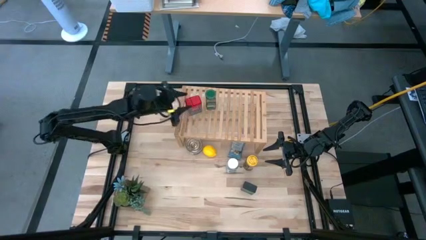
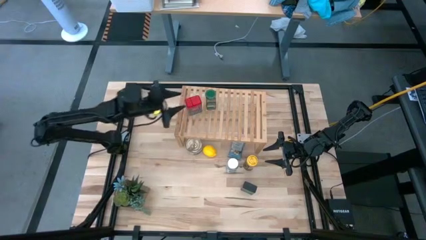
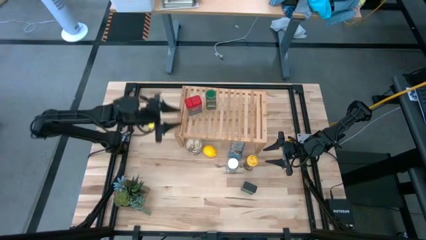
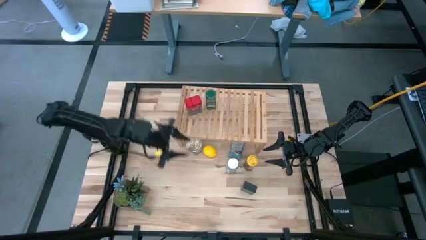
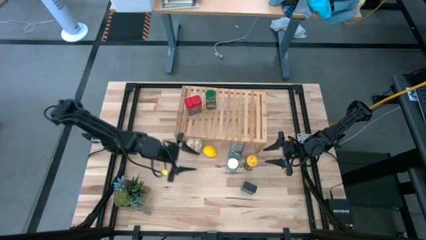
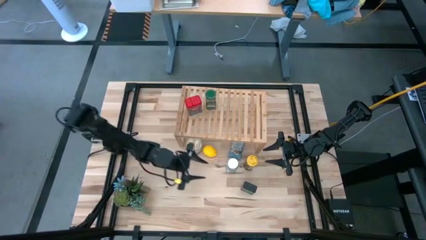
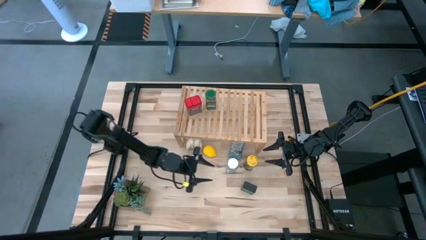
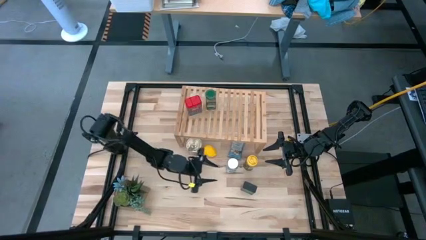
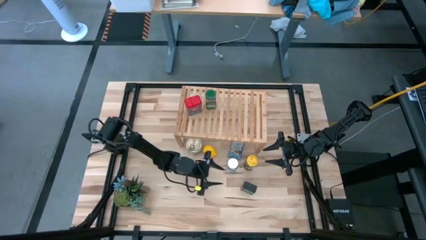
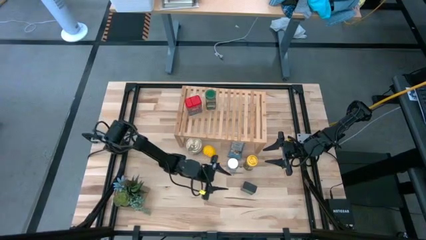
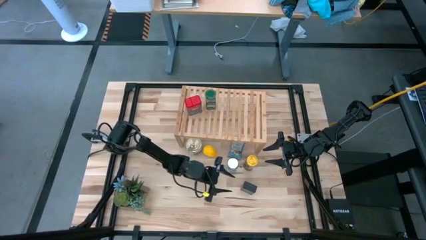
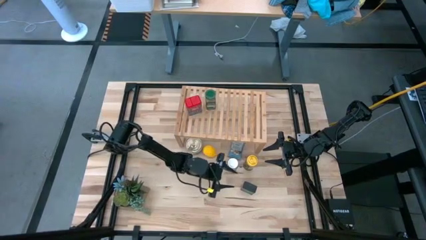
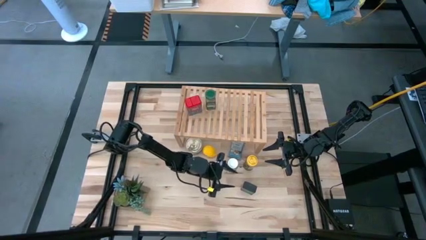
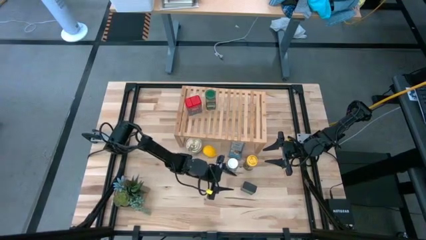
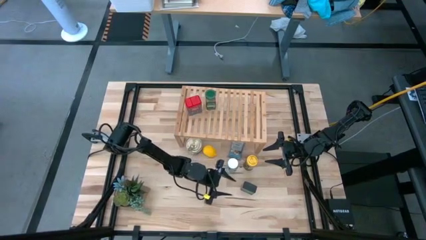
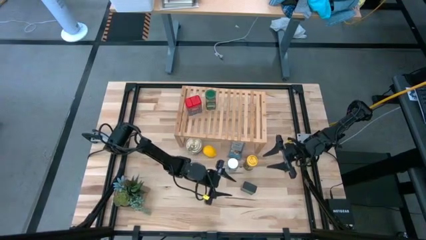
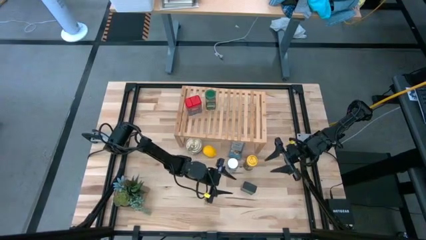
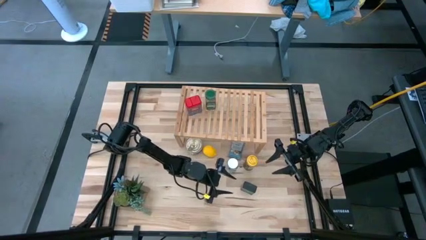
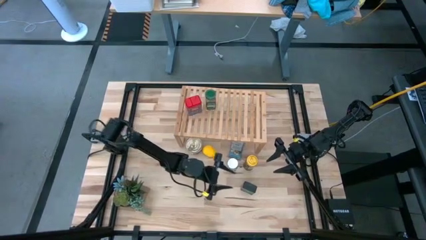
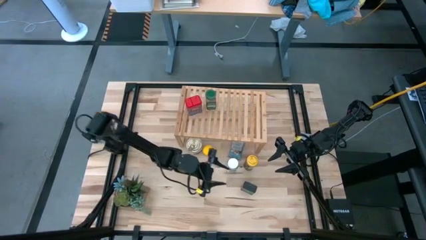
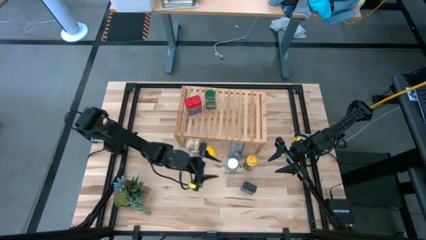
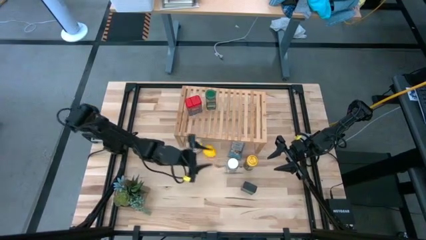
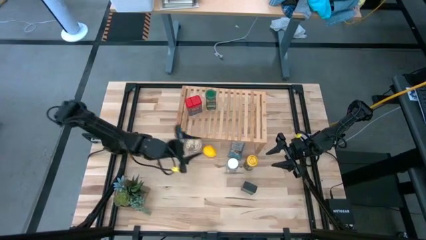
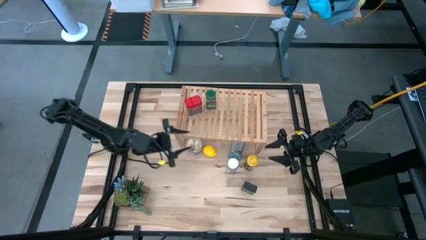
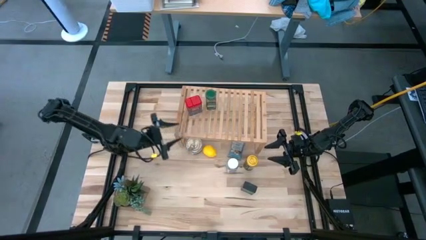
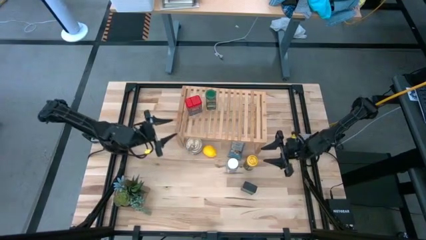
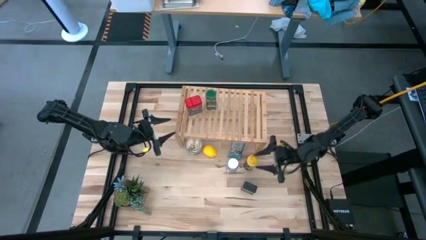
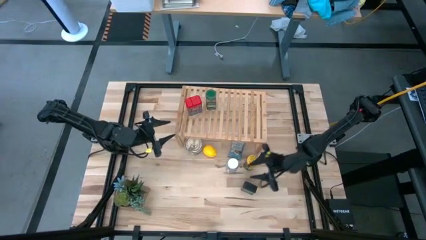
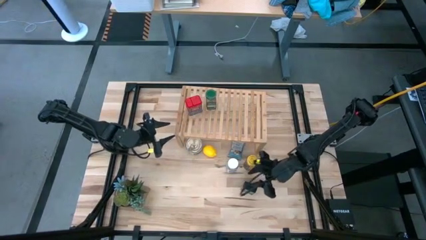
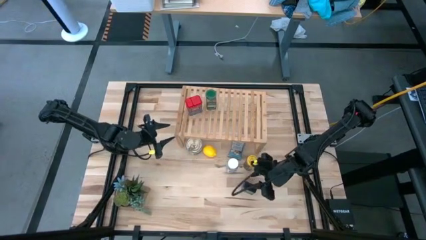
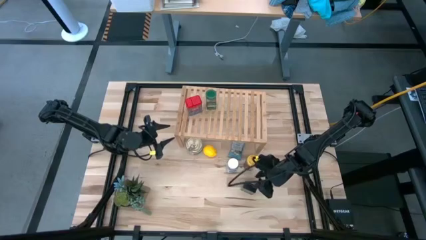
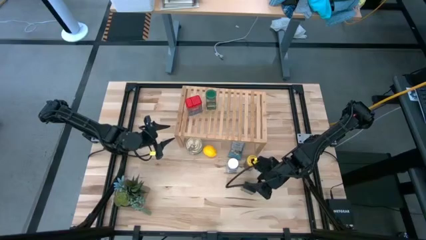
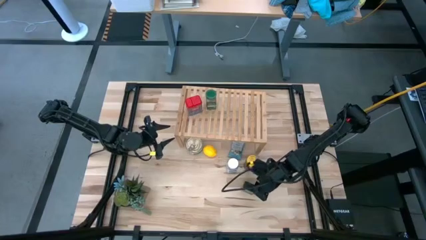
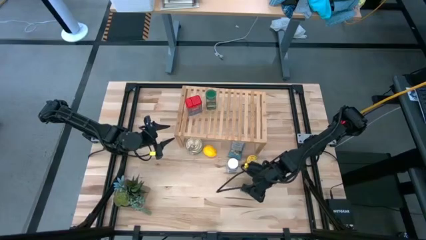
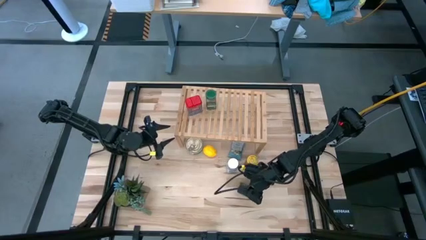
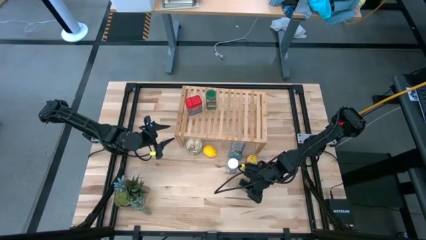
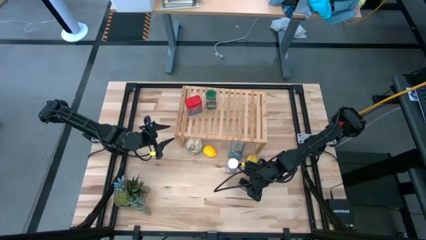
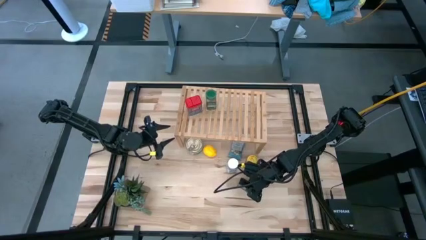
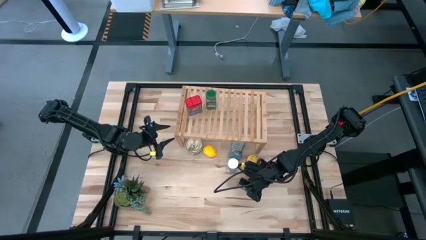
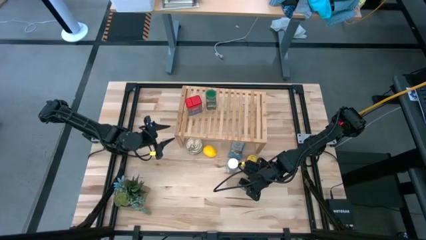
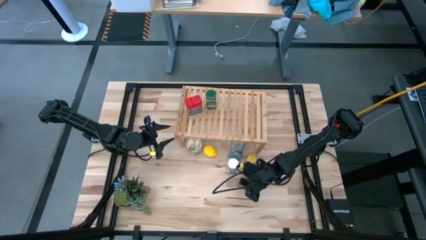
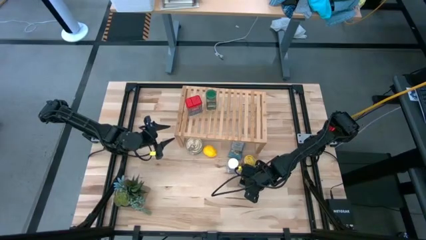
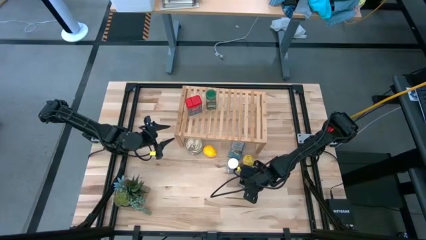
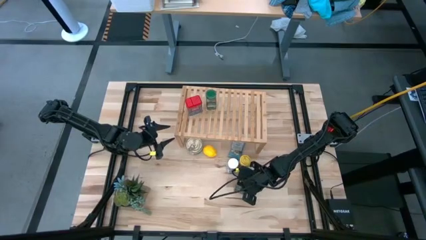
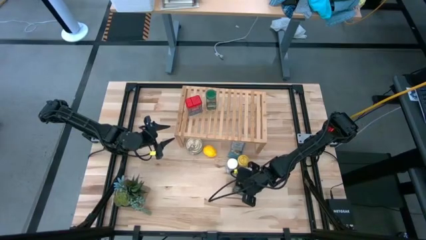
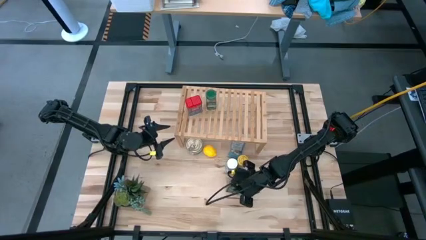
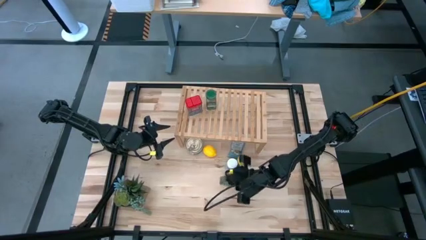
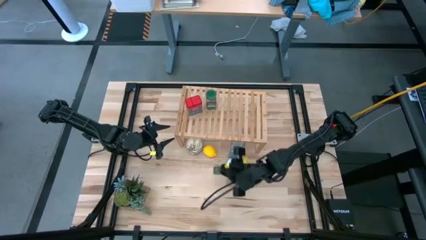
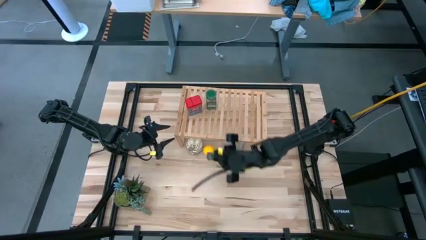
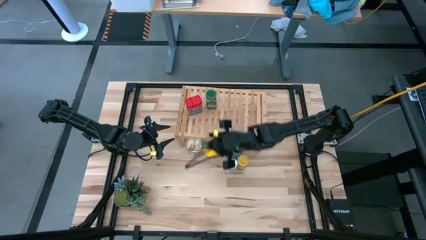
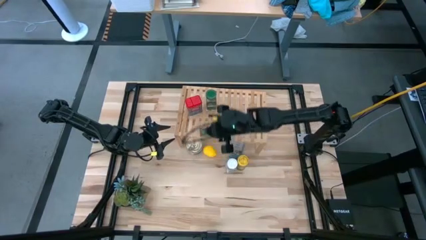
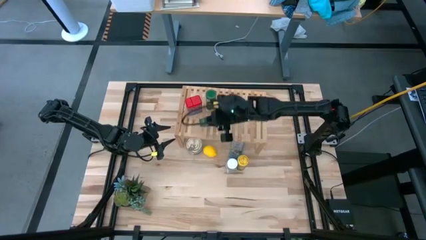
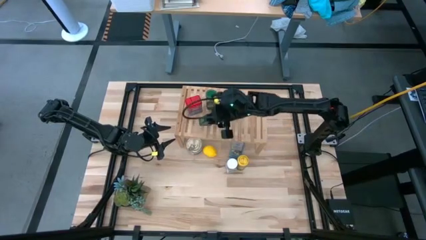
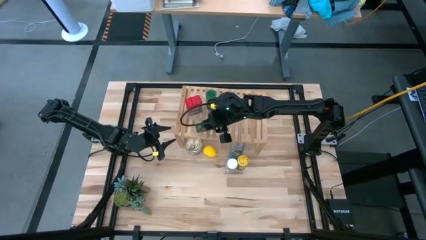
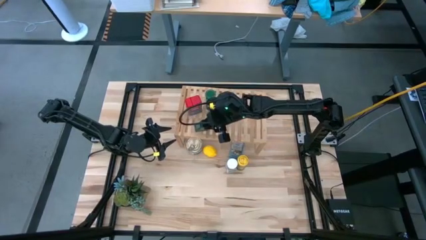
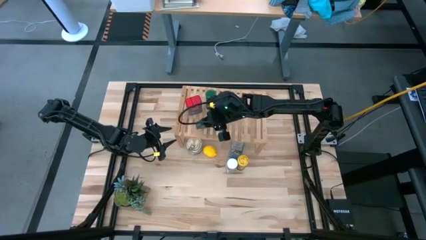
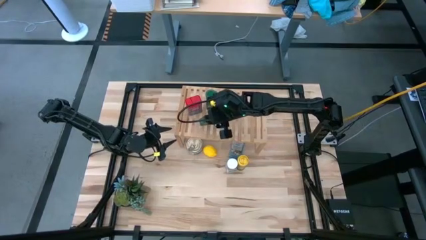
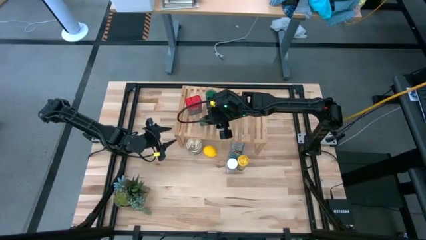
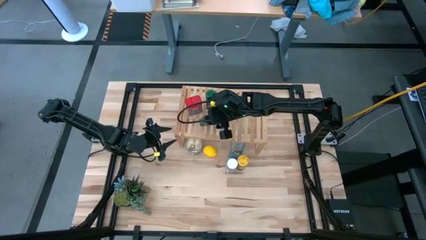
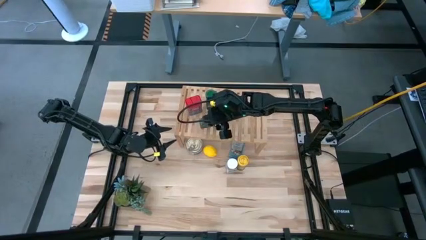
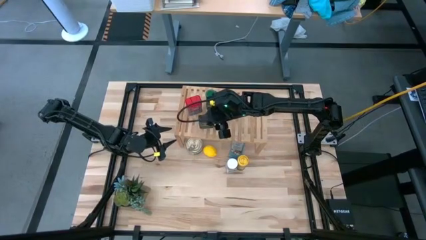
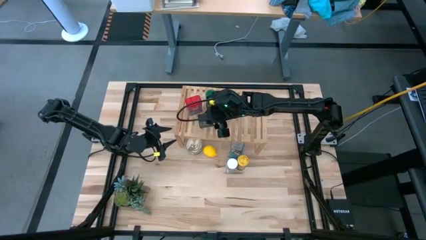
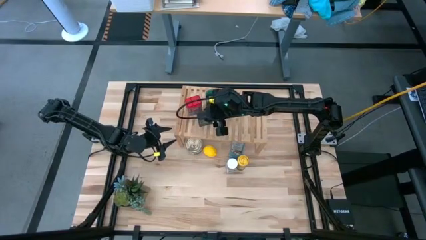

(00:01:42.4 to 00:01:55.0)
Task: Shelf spices
Put the black seasoning can on the shelf
